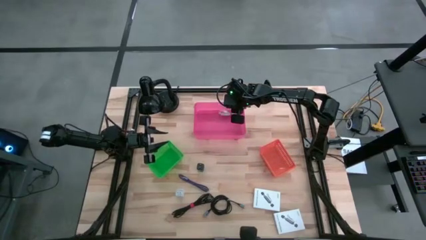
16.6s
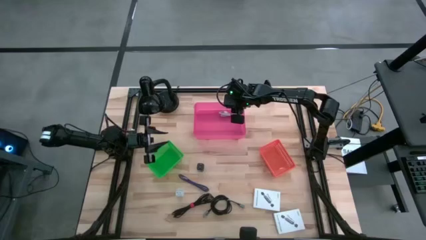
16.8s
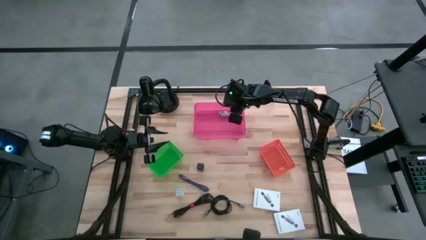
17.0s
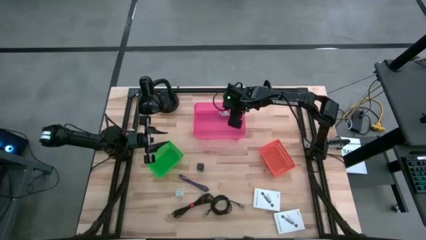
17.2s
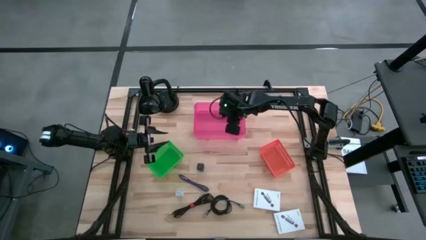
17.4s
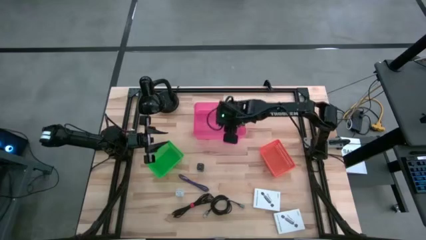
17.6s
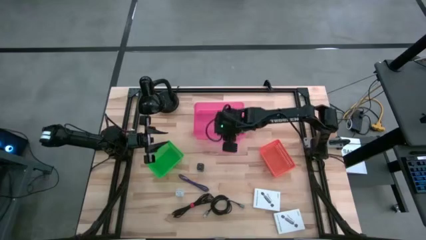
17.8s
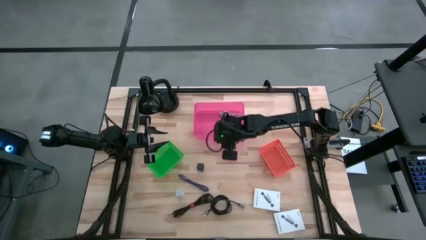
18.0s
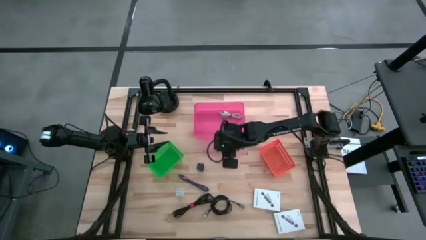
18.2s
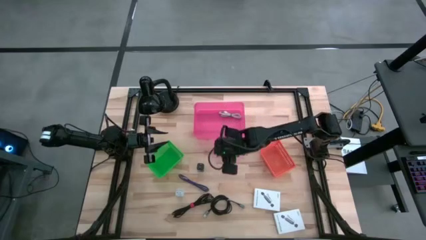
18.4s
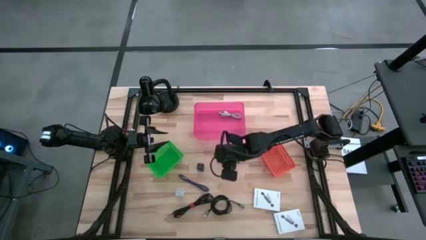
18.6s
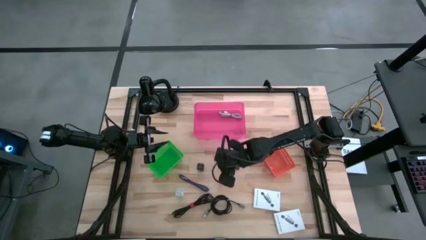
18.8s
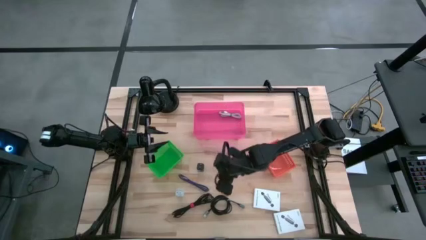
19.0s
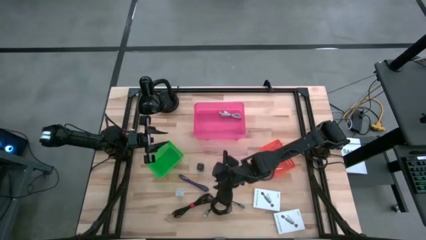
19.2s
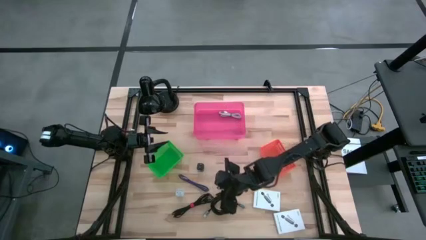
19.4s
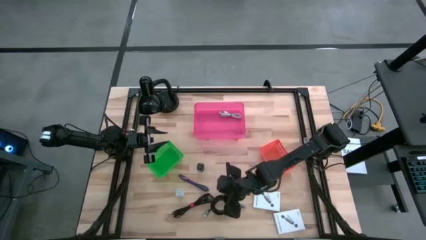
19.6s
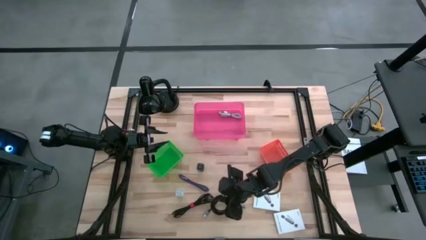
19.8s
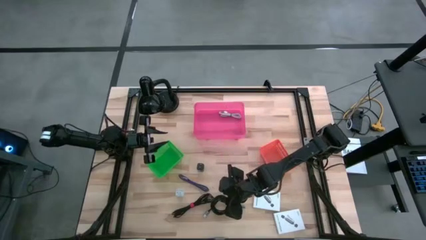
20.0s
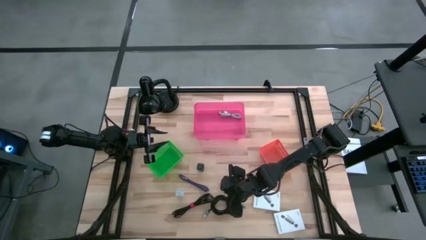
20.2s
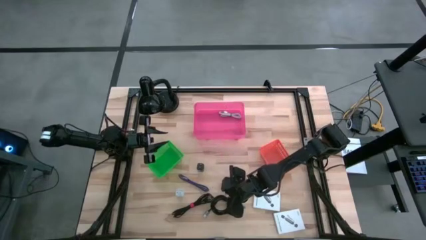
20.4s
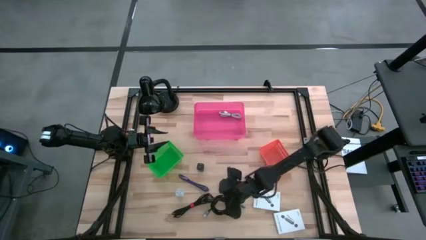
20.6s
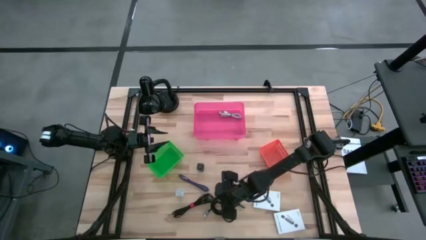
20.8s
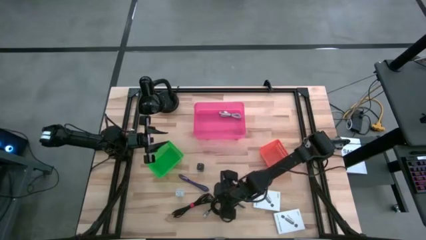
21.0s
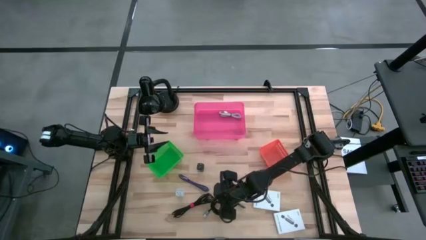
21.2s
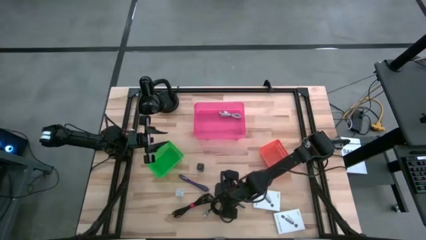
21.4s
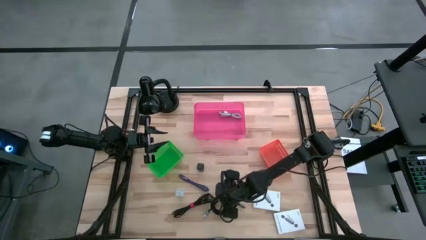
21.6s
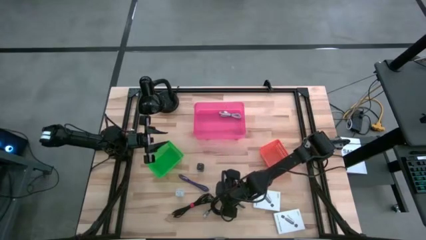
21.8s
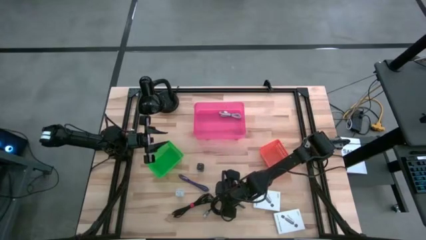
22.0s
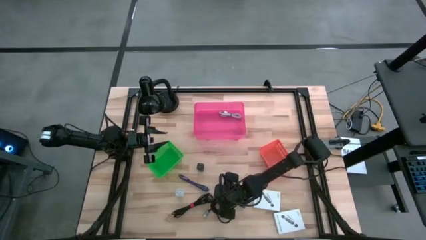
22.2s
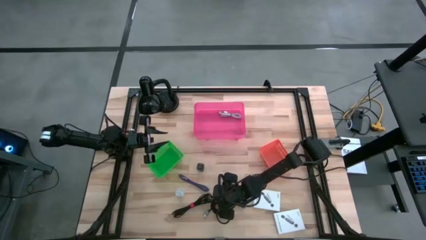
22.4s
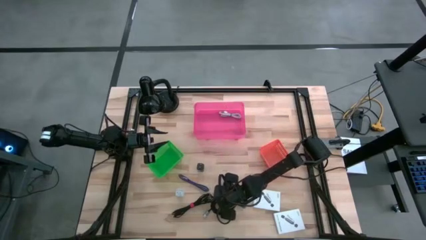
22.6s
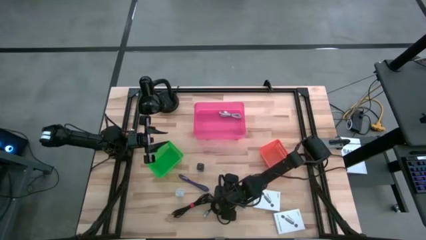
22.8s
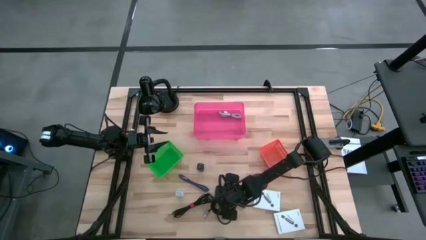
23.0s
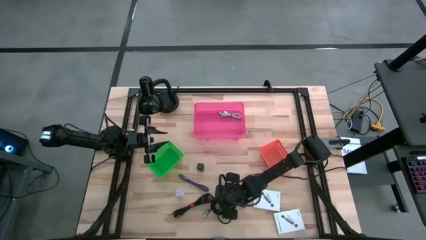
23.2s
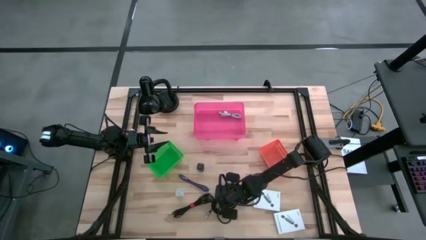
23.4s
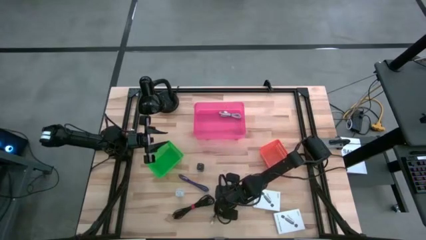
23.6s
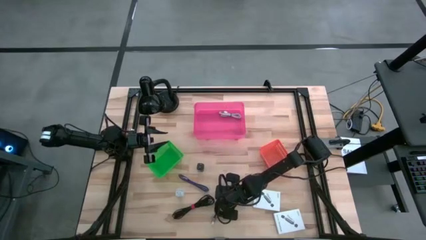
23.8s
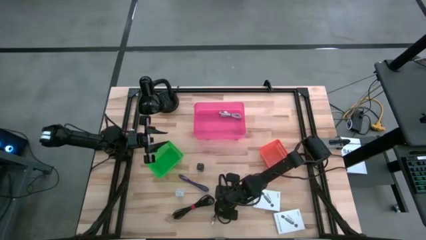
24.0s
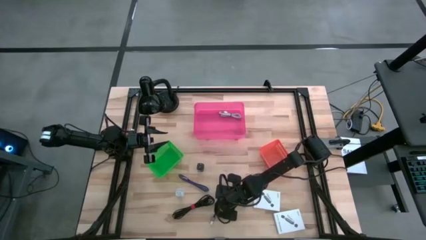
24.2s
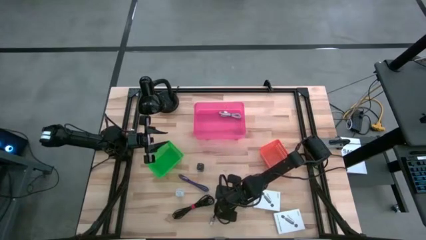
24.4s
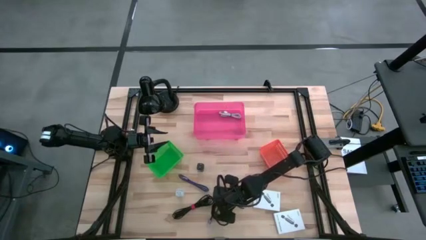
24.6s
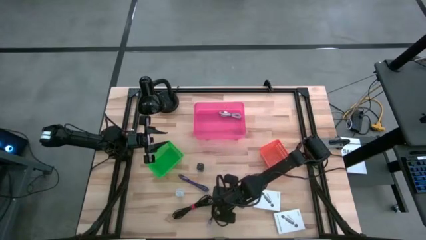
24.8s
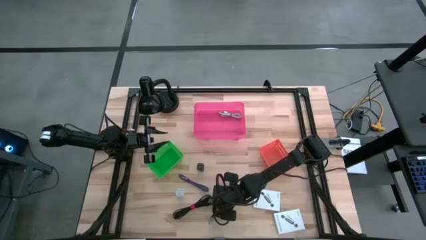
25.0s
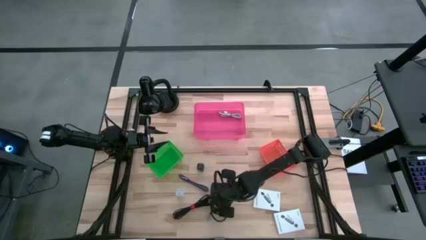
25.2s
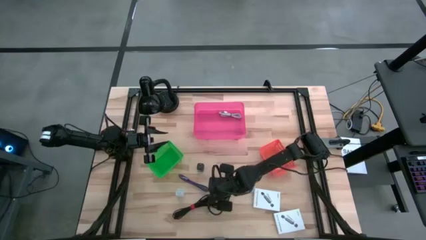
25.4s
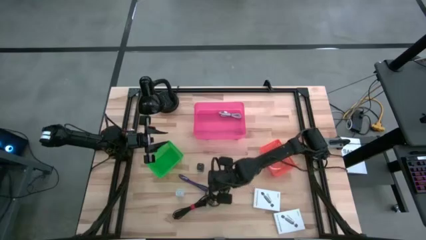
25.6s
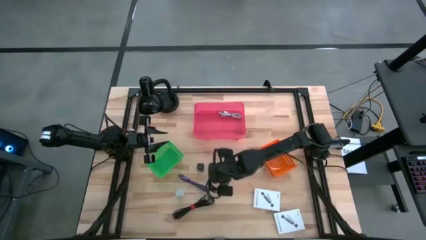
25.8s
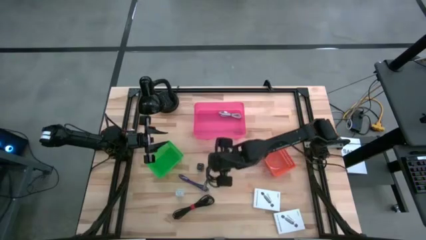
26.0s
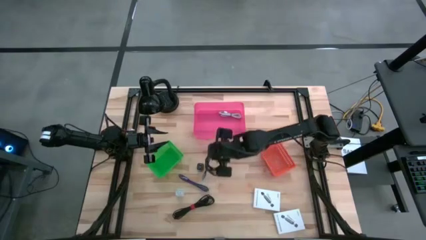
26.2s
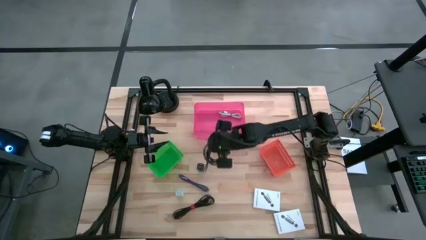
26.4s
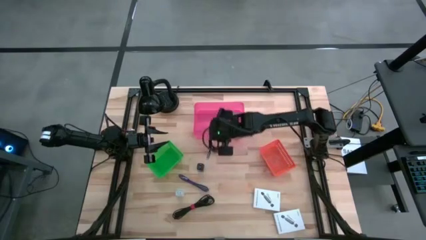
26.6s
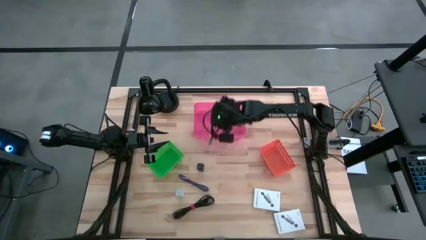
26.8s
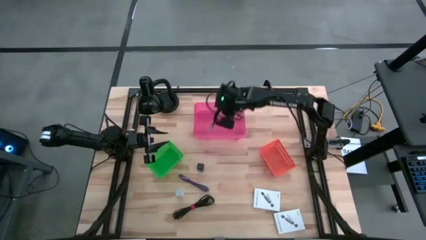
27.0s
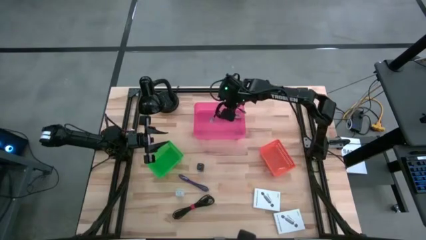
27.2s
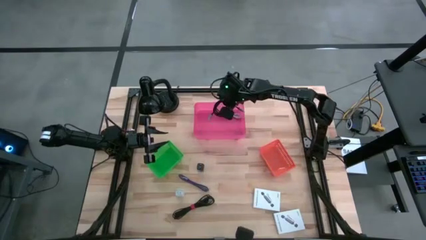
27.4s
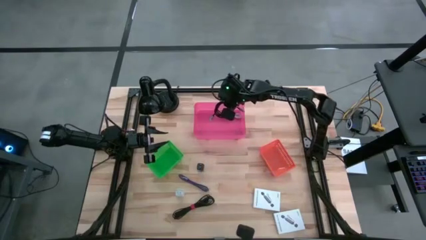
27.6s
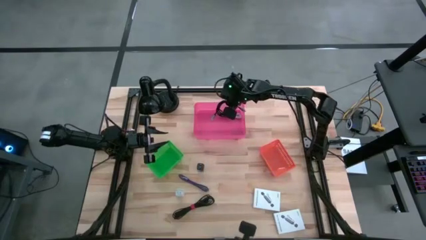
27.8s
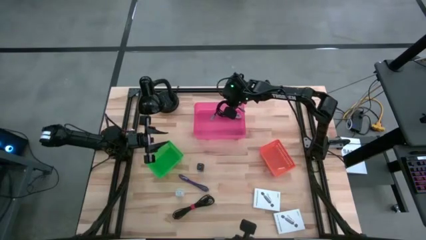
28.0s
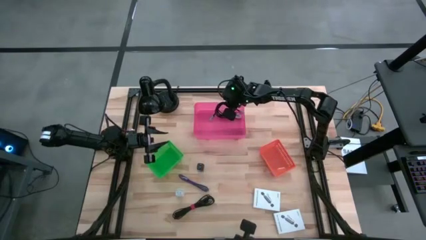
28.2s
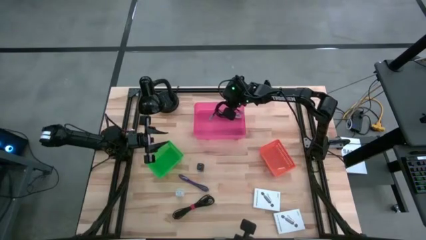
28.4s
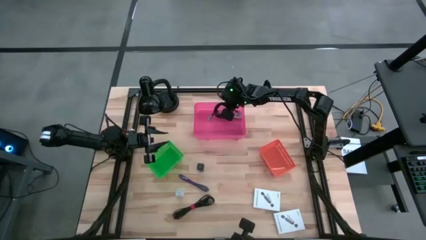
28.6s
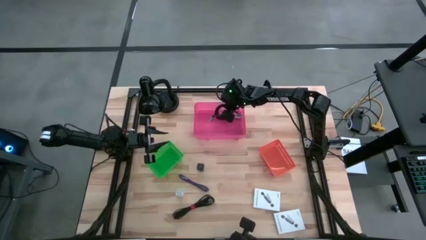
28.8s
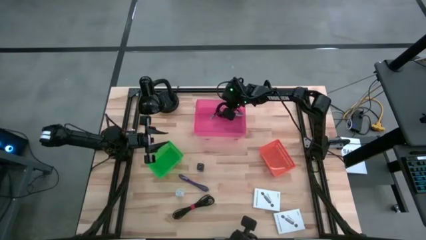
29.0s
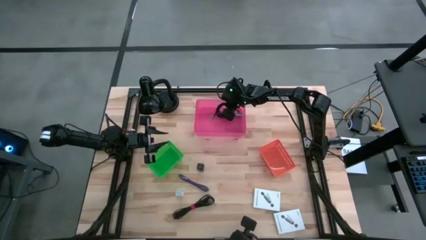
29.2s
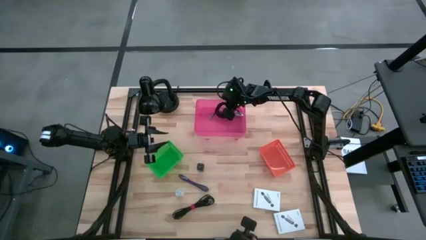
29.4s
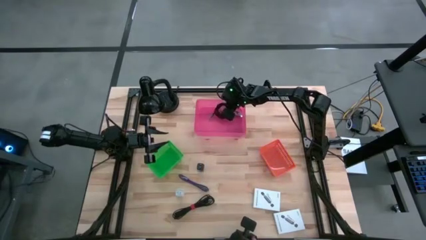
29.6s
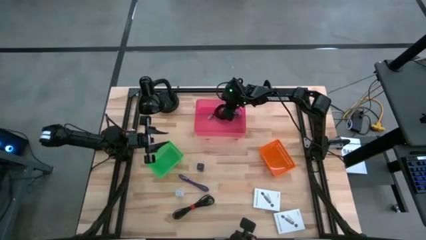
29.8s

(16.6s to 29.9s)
Task: Pick and place items into bin
Put the right black charger cable into the pink bin
